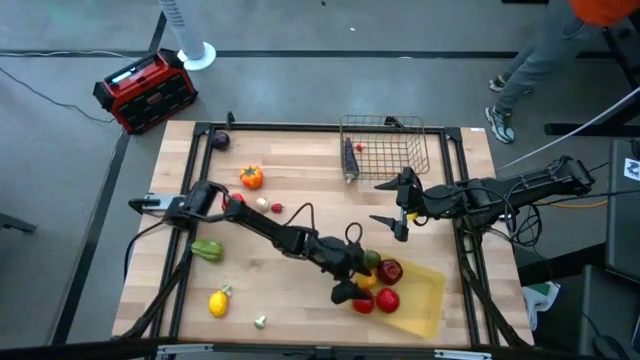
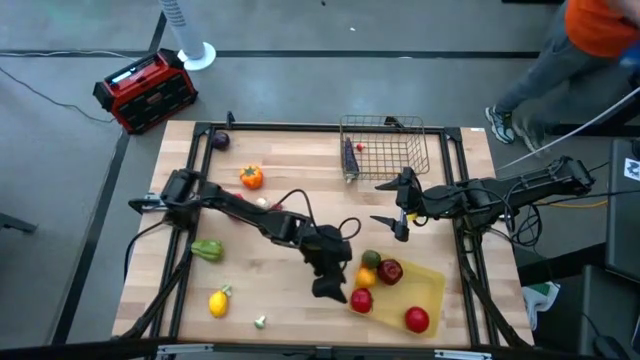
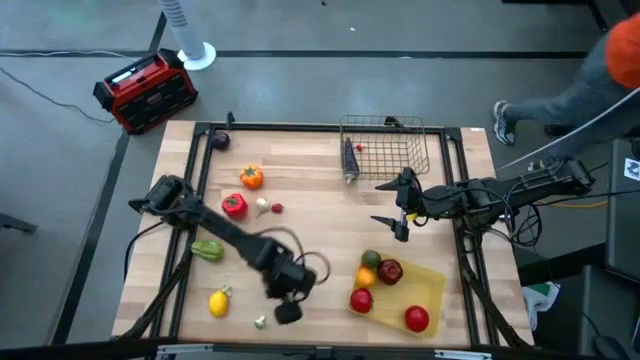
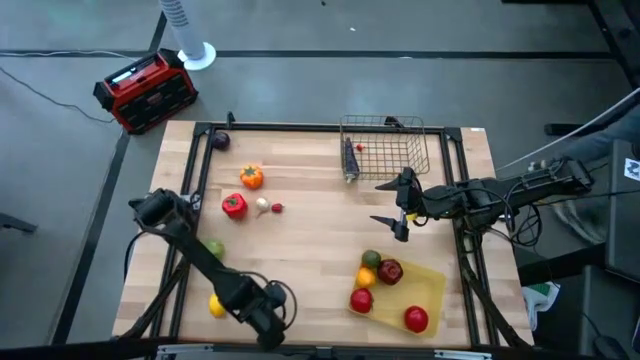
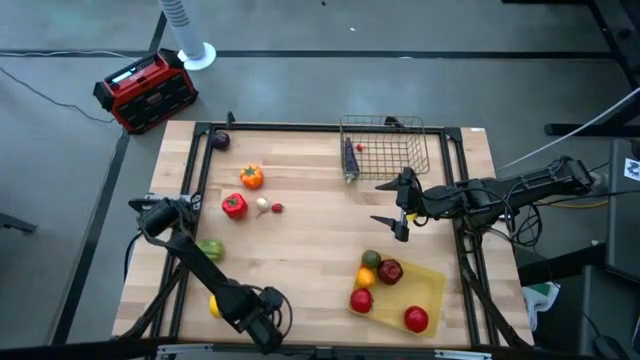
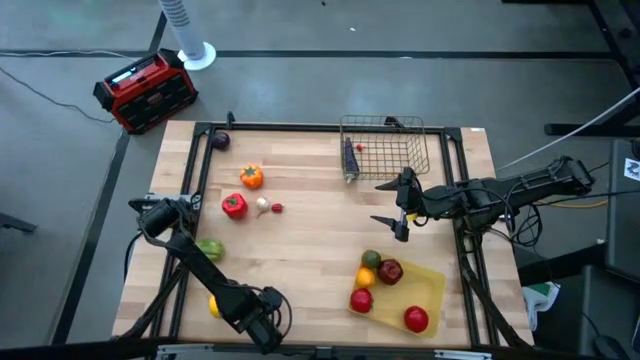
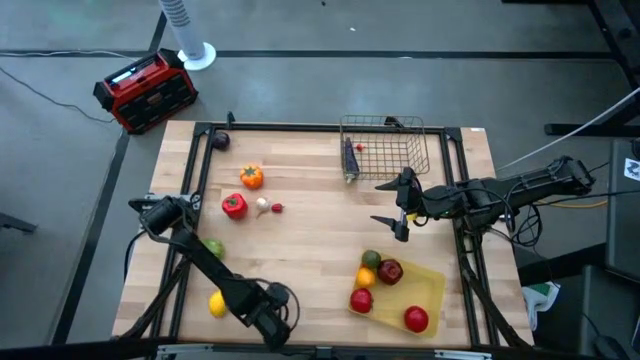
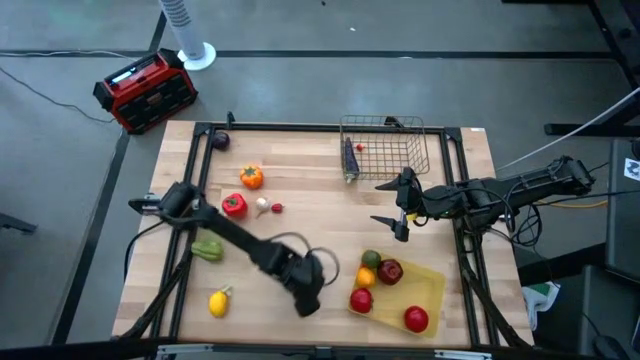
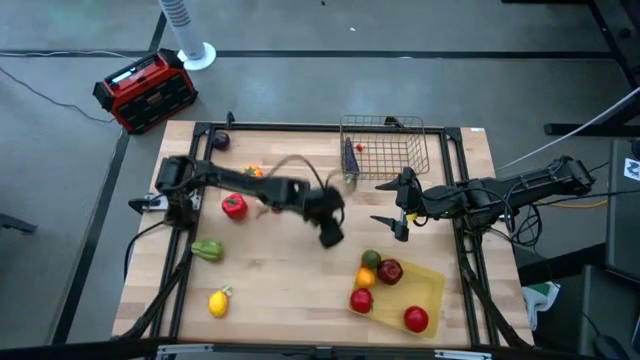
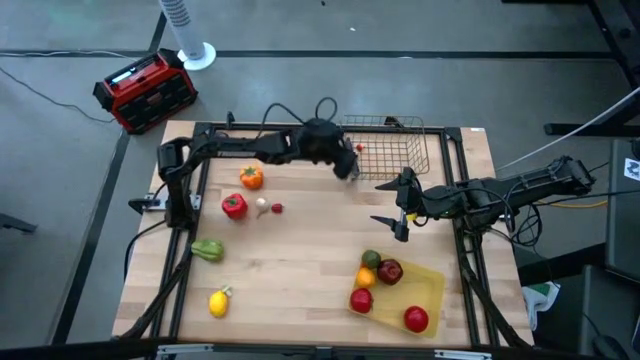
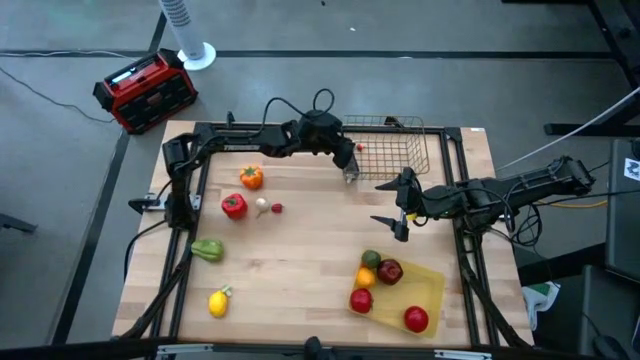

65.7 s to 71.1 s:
Task: Sort produce into baskets
Put the green mushroom into the wire basket

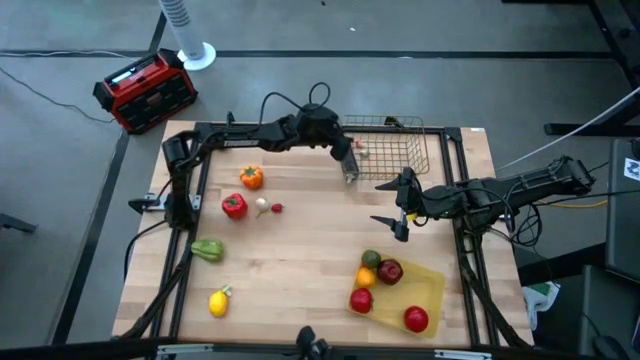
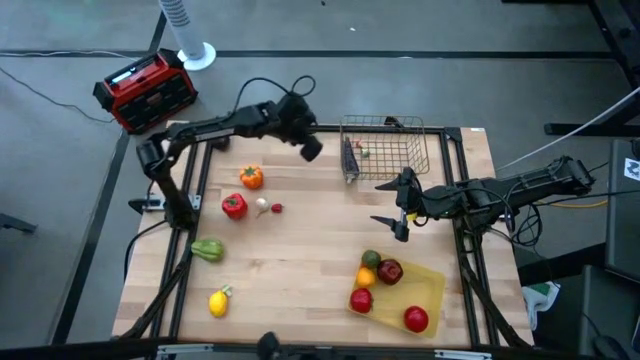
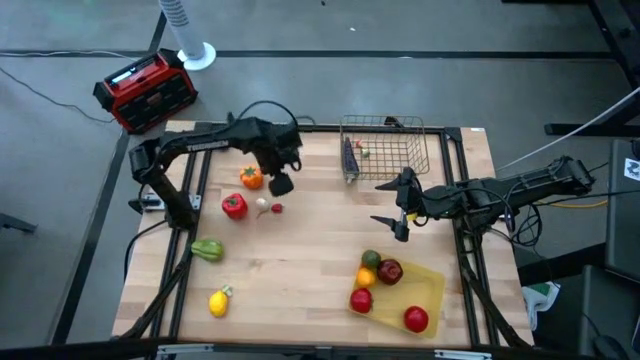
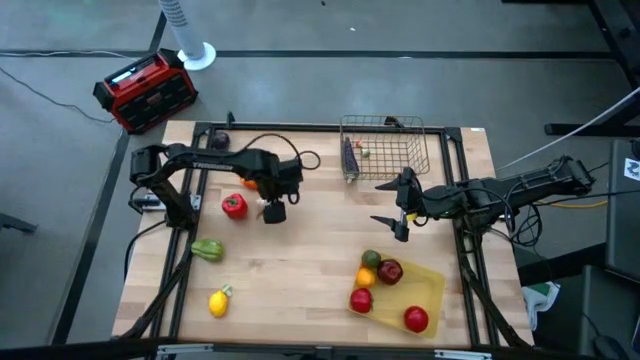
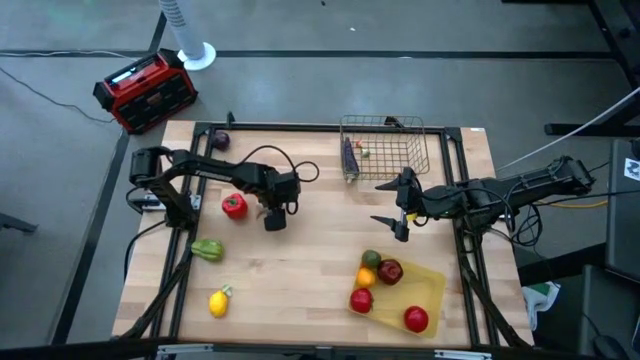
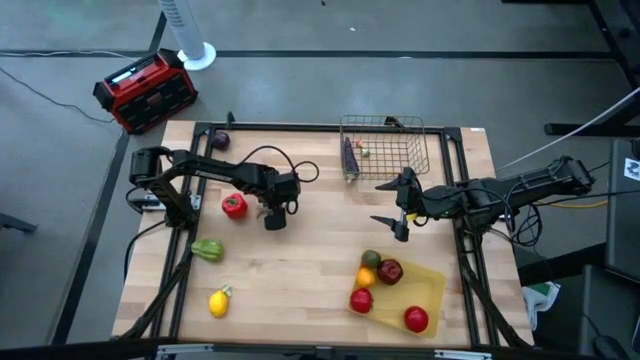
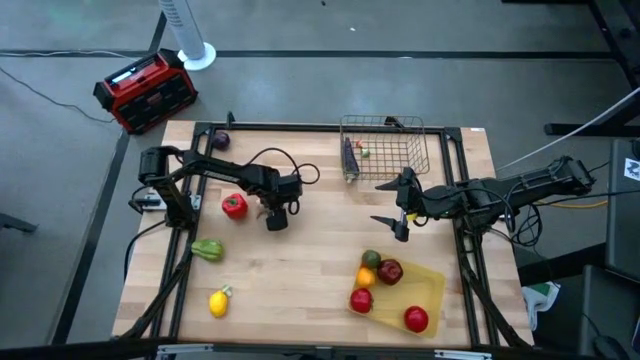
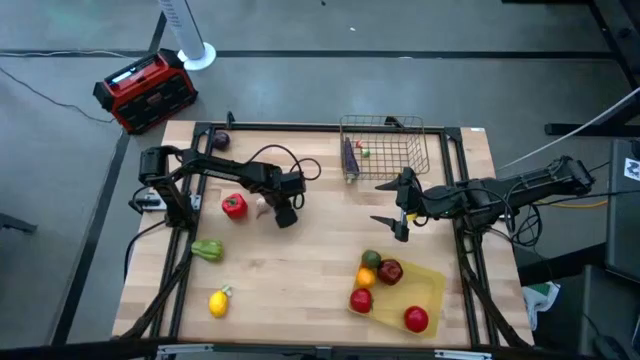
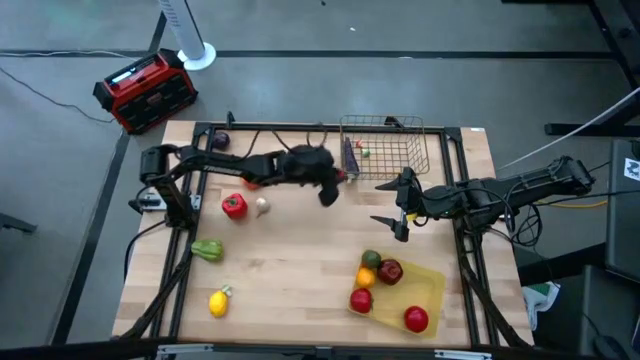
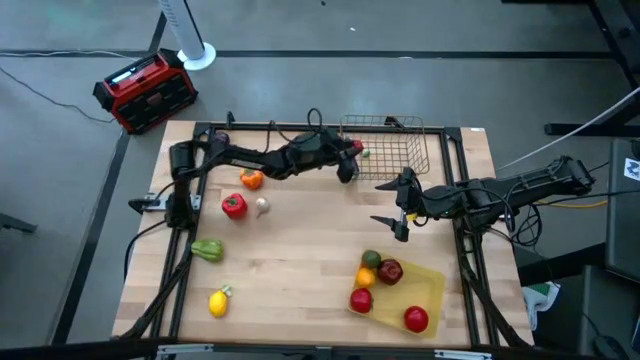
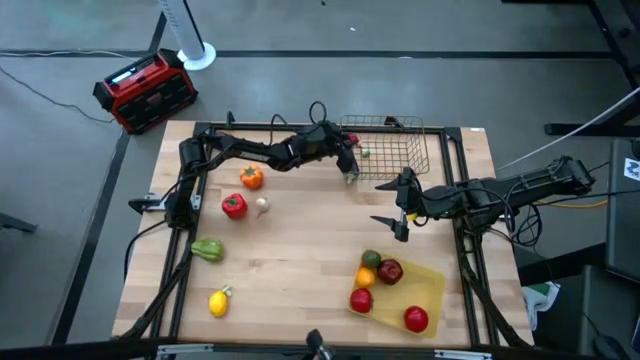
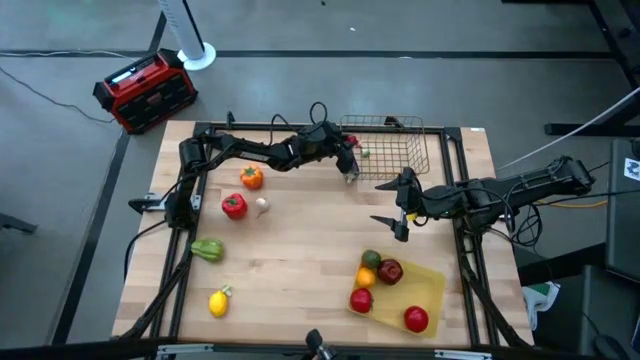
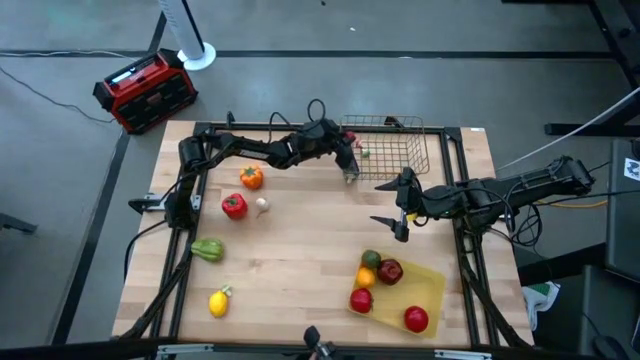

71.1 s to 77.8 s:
Put the pepper into the wire basket

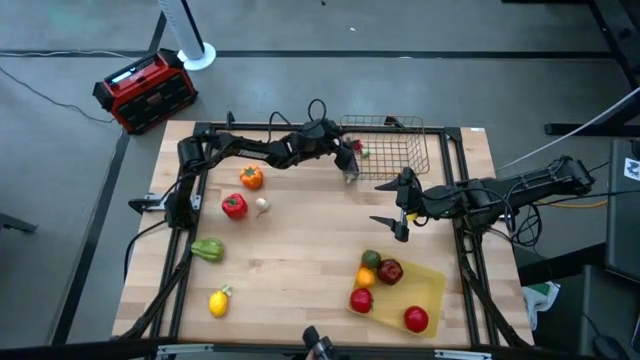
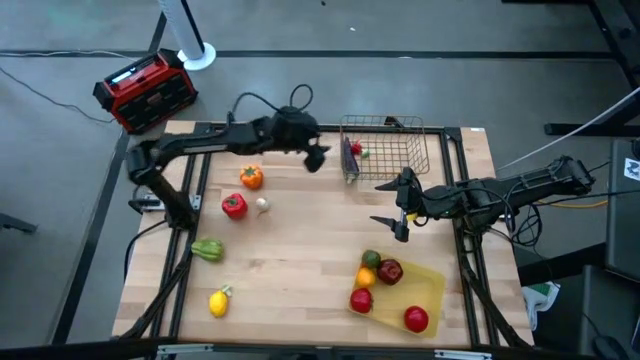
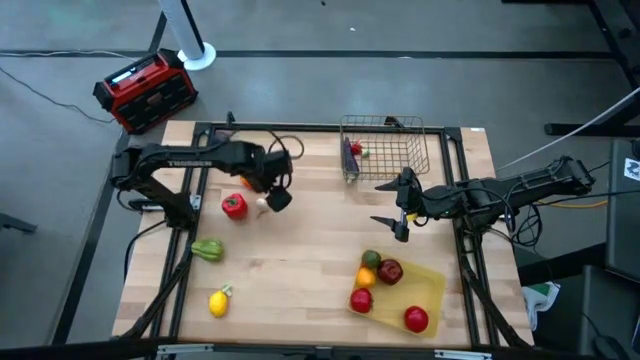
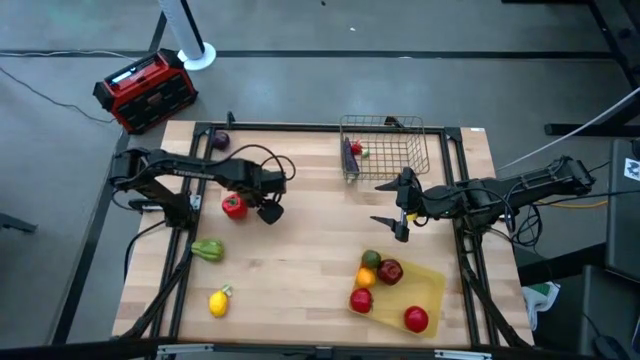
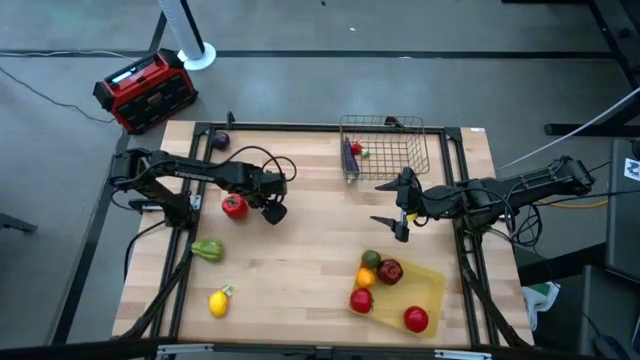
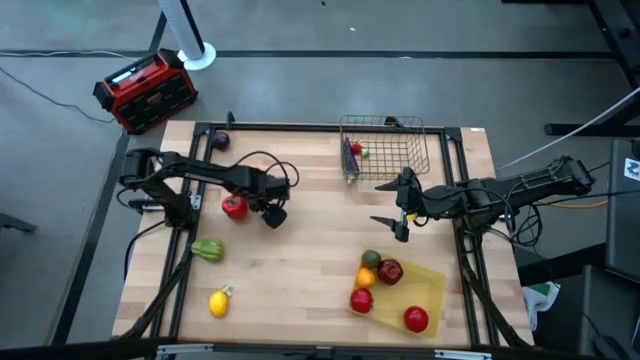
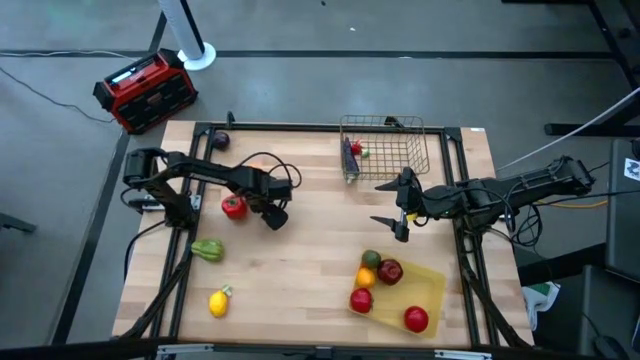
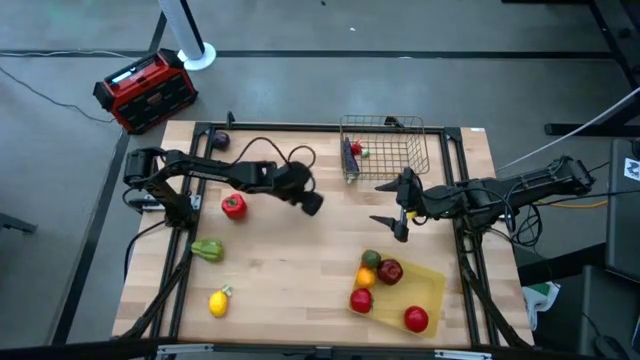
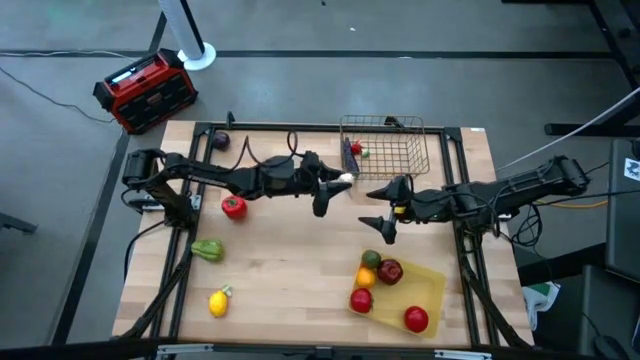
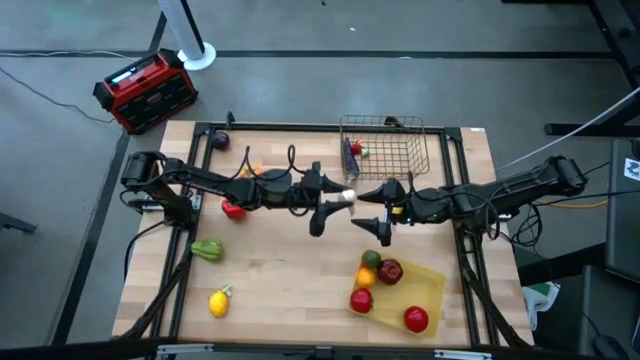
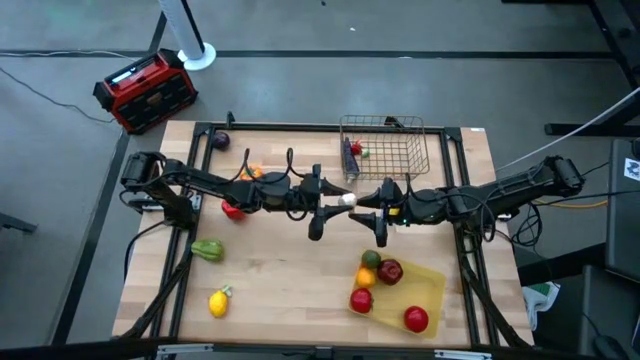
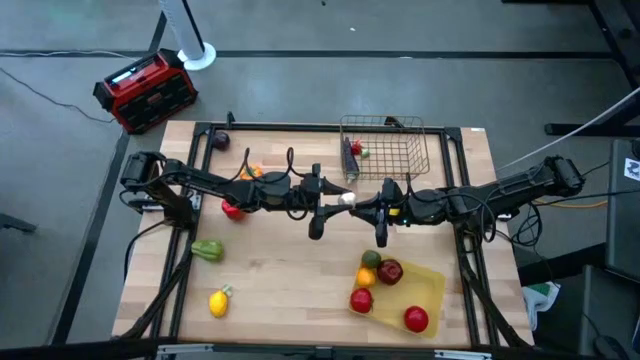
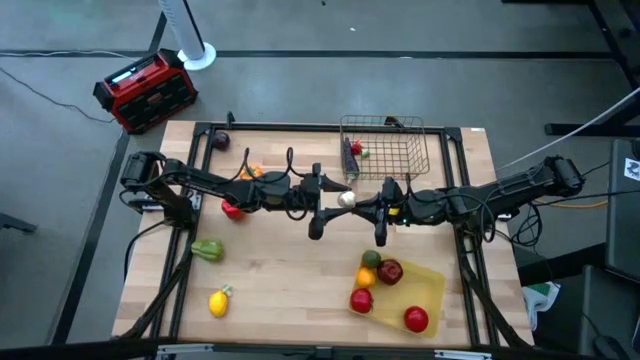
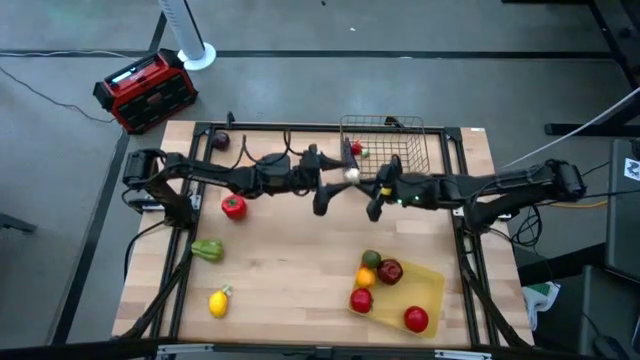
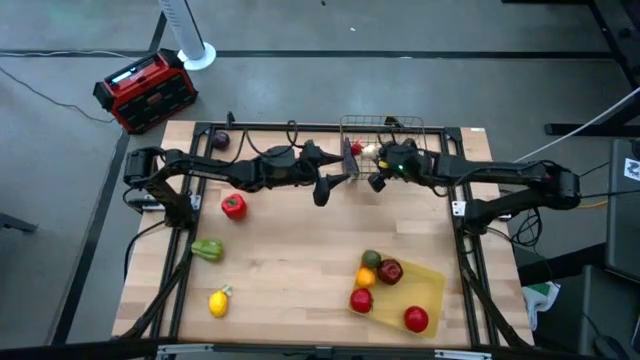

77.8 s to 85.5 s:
Put the garlic into the wire basket

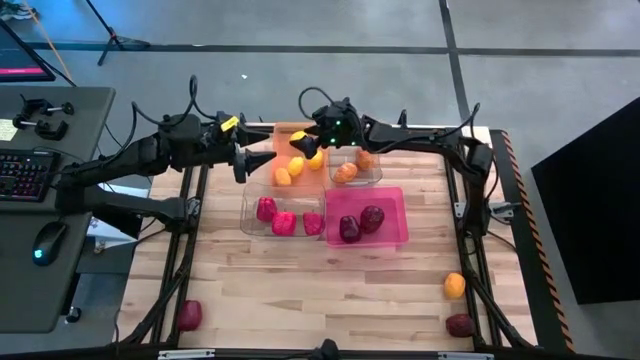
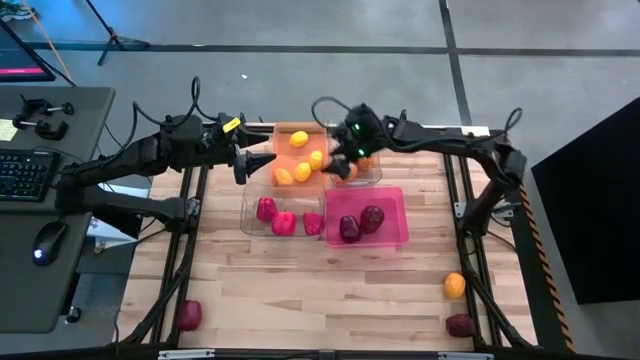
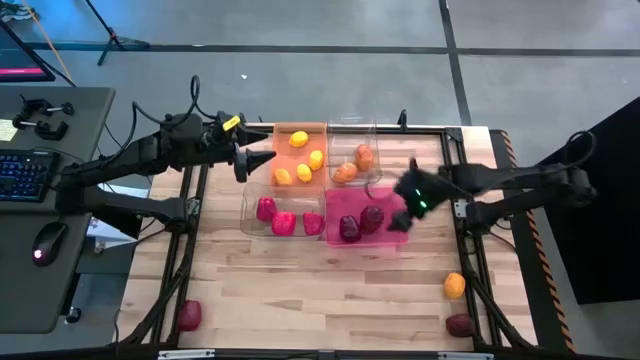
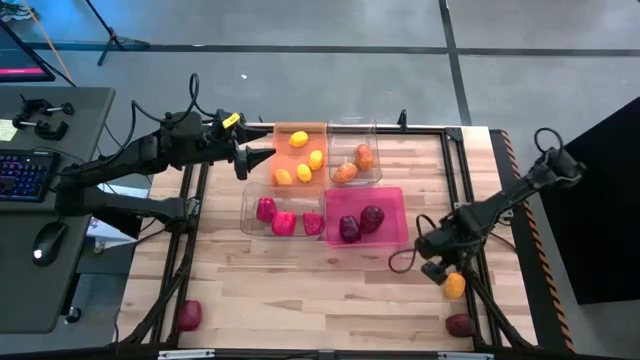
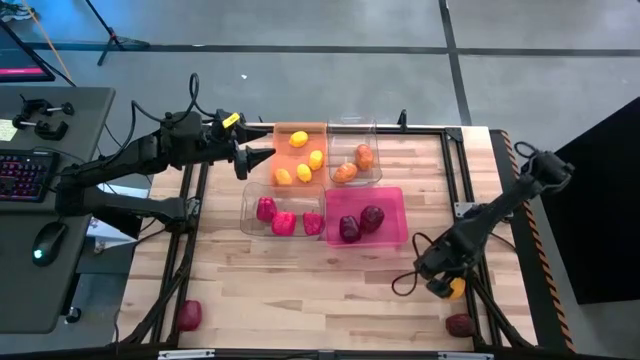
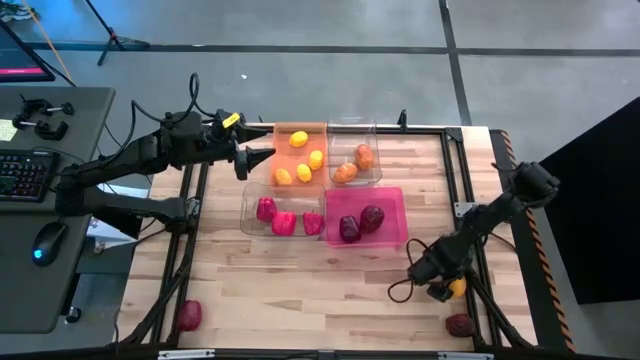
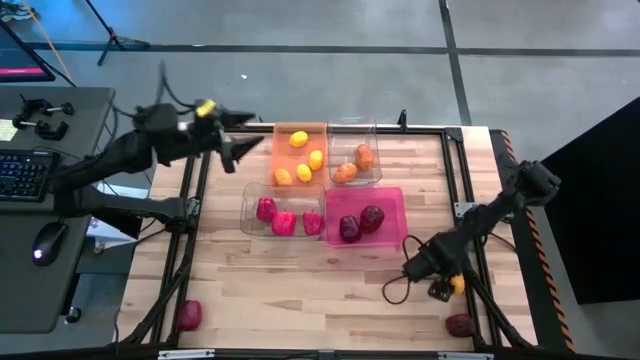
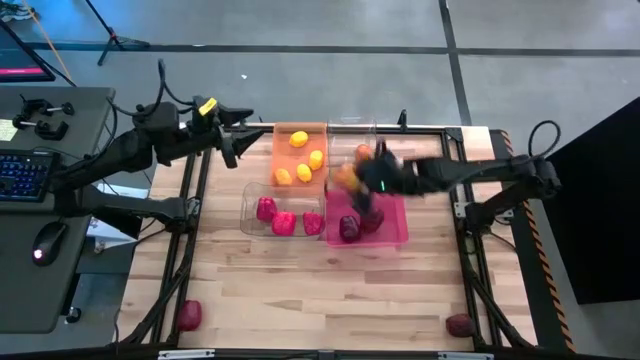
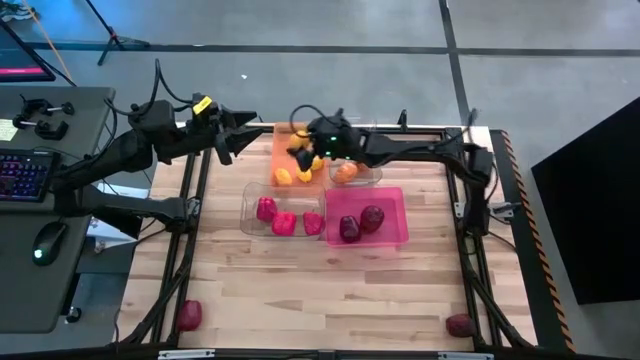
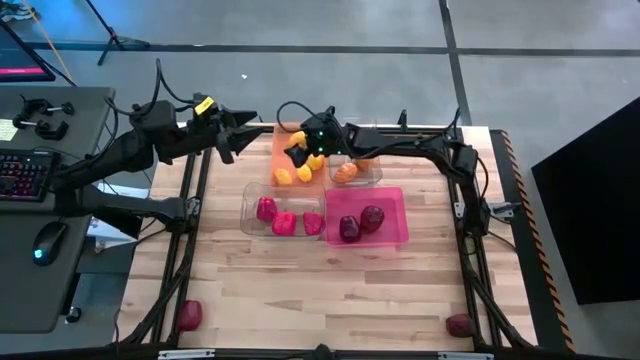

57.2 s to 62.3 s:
Task: Sort produce into baskets
Put the lemon into the orange bin
